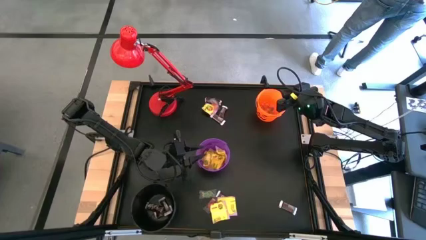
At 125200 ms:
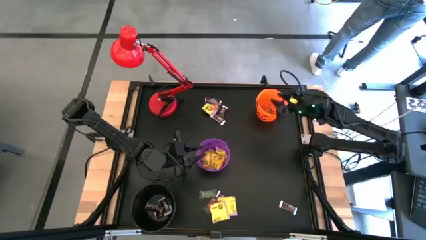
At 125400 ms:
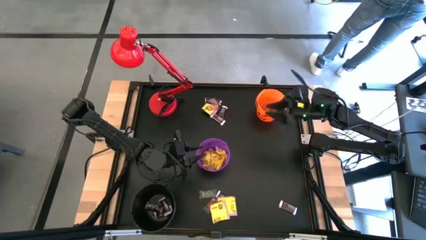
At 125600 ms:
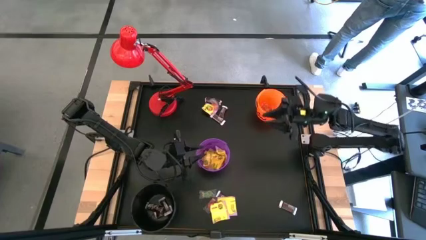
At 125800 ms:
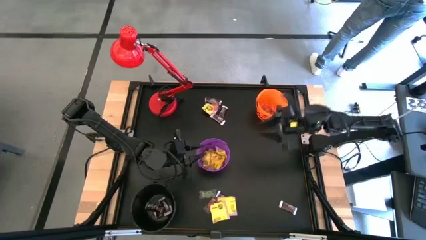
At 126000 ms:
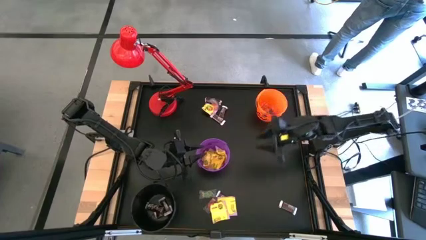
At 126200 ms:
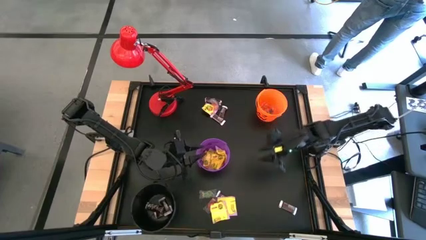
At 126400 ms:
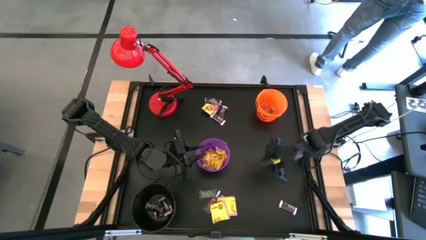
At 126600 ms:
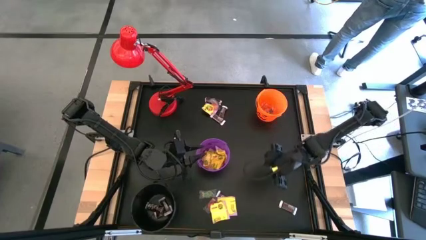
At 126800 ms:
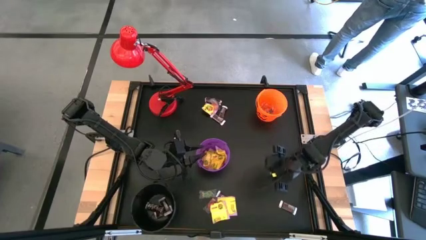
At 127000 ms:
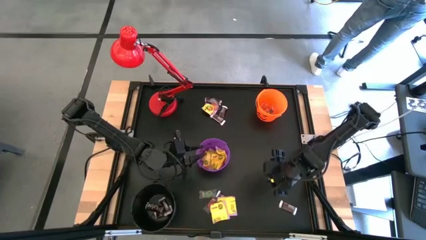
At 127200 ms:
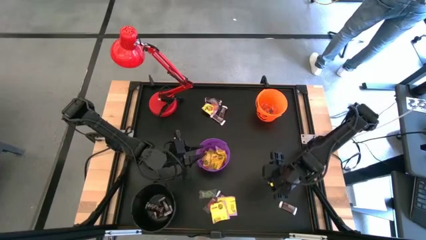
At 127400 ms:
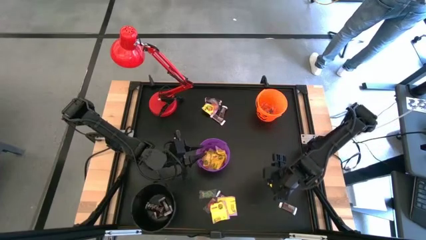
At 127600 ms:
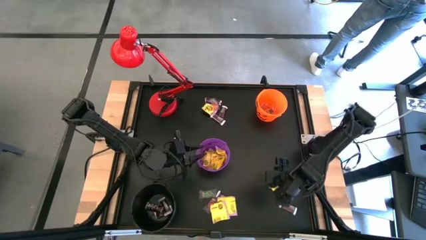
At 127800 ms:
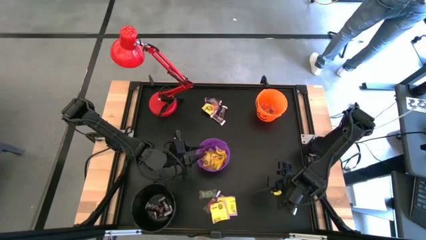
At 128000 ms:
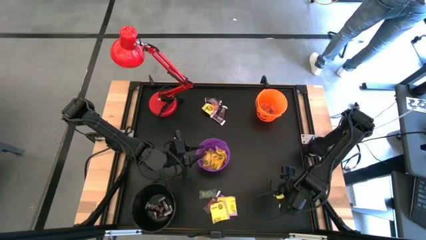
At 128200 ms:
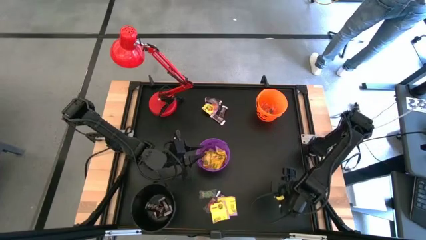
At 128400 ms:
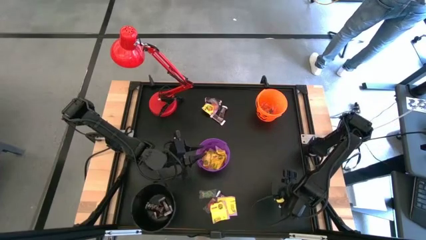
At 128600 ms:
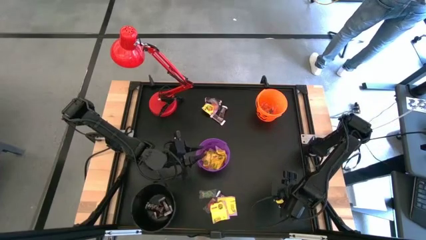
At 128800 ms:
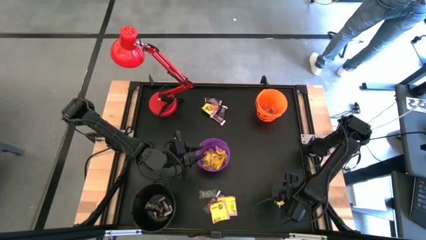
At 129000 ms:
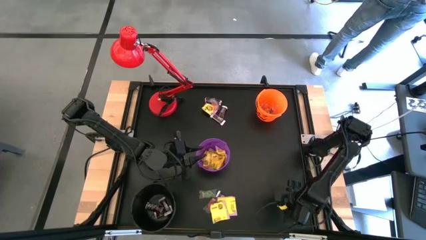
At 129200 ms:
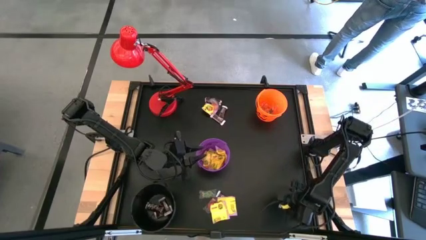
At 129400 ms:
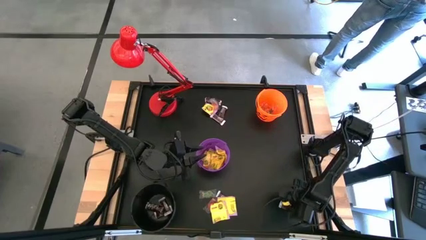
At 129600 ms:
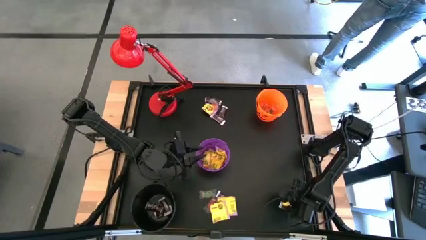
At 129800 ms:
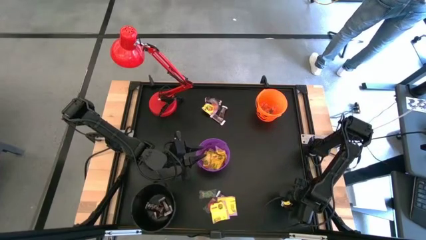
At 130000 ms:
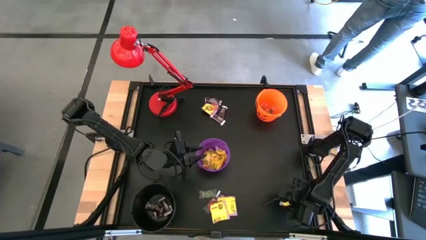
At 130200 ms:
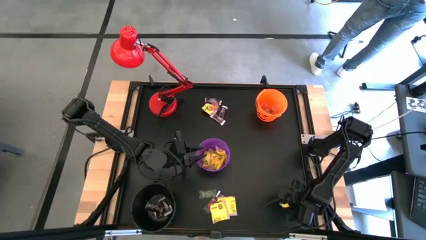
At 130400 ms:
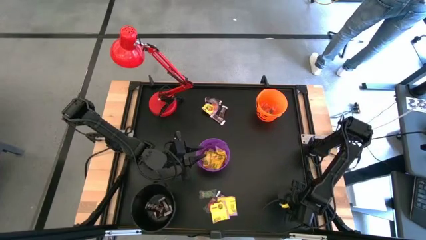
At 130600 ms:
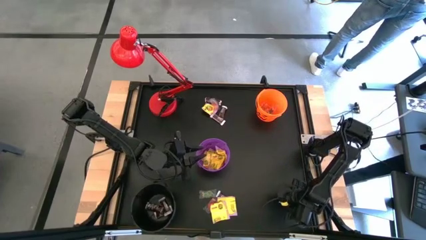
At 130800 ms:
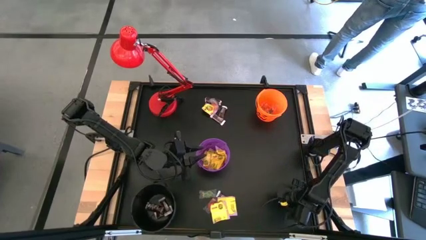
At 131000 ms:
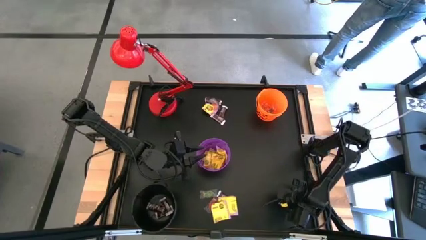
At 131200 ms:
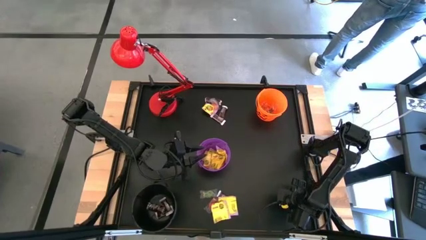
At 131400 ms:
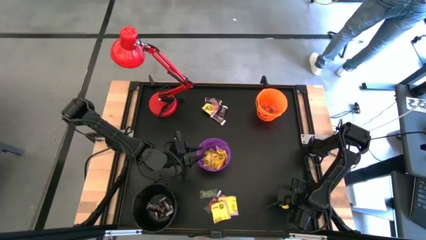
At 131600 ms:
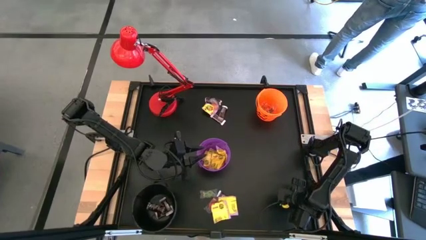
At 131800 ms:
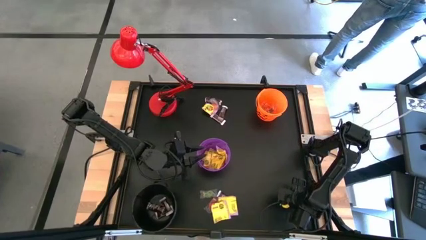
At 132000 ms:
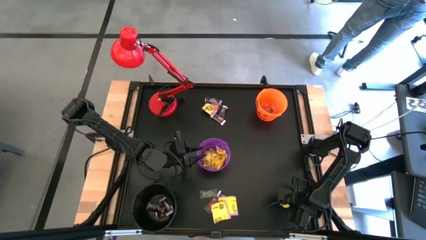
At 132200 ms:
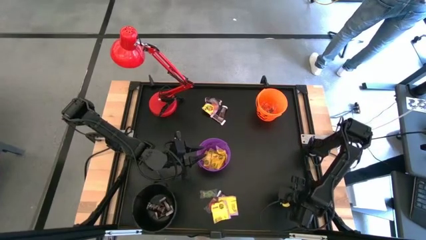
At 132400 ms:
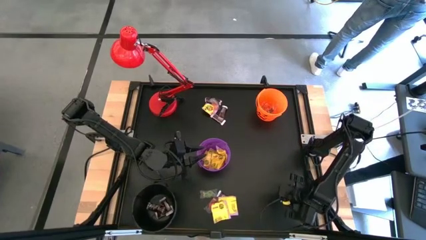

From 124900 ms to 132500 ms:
Task: Sort candy
Put the brown chocolate bar into the black bucket

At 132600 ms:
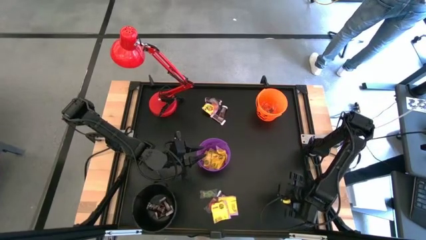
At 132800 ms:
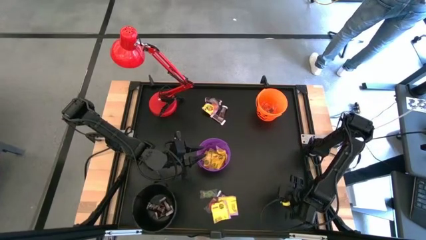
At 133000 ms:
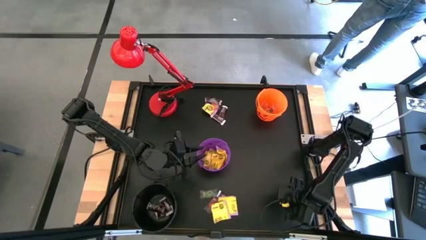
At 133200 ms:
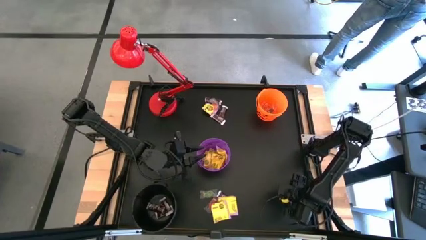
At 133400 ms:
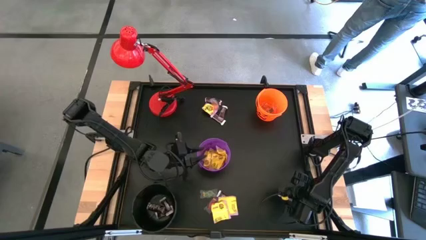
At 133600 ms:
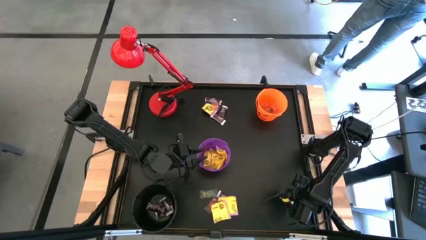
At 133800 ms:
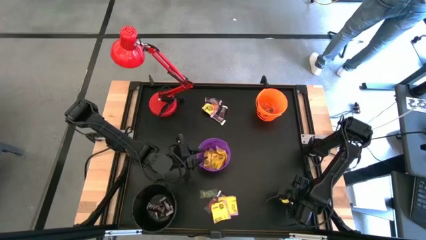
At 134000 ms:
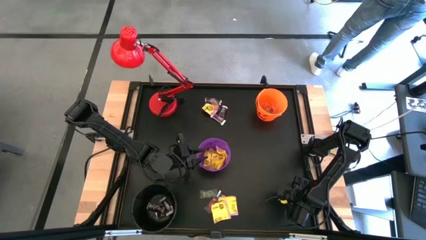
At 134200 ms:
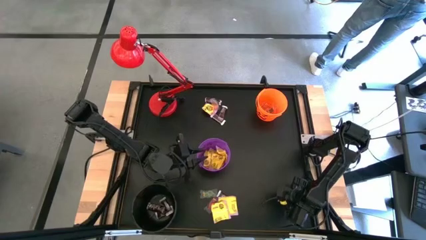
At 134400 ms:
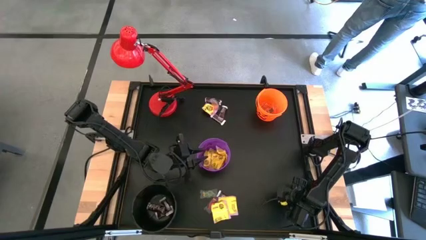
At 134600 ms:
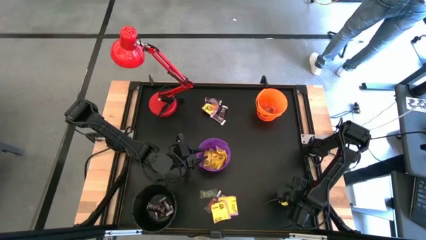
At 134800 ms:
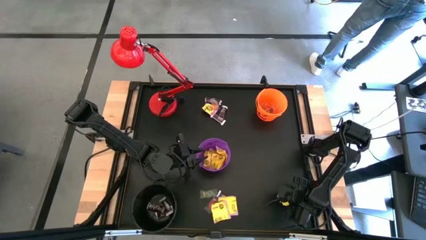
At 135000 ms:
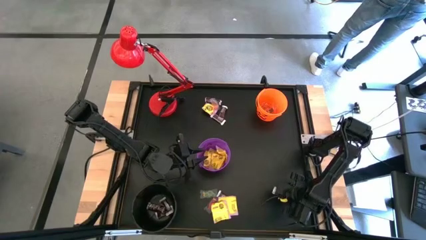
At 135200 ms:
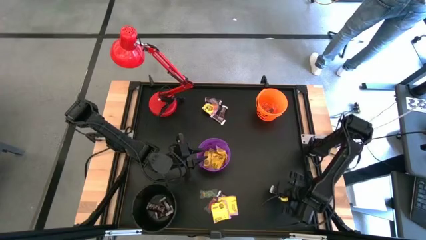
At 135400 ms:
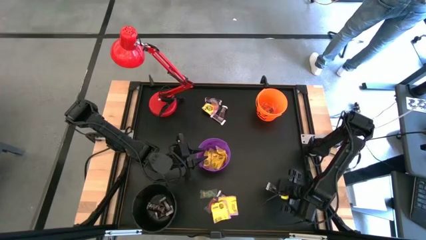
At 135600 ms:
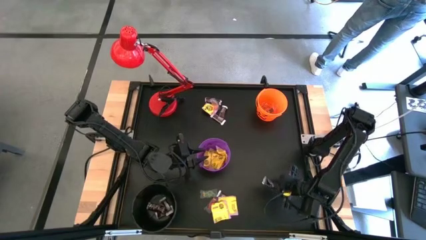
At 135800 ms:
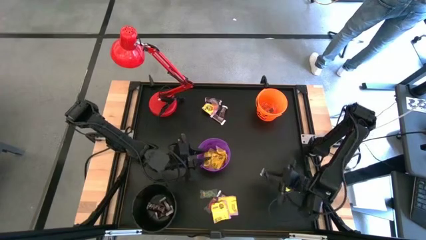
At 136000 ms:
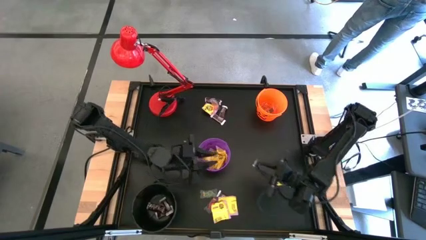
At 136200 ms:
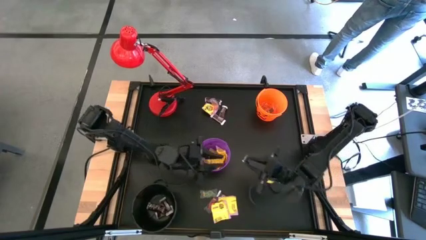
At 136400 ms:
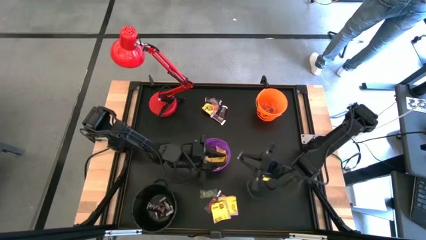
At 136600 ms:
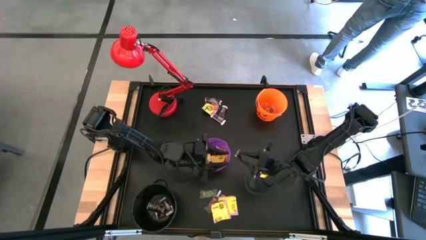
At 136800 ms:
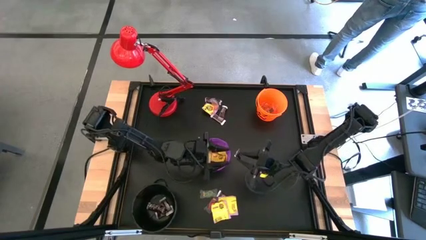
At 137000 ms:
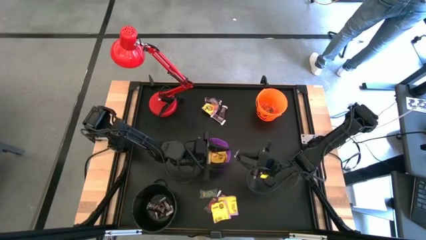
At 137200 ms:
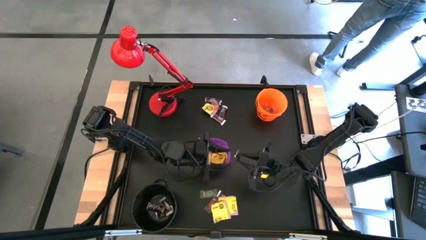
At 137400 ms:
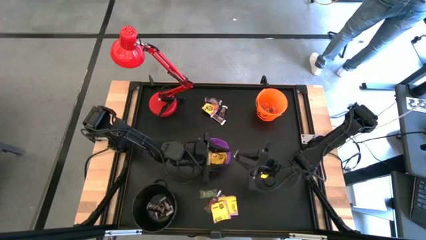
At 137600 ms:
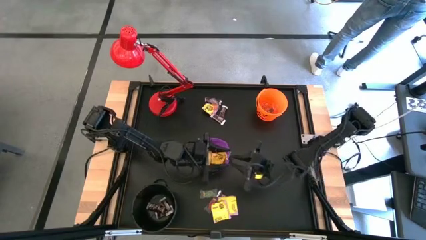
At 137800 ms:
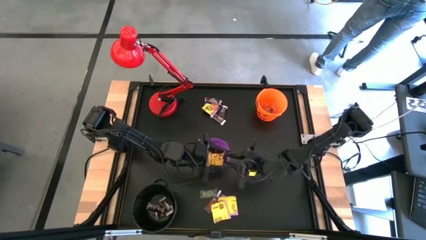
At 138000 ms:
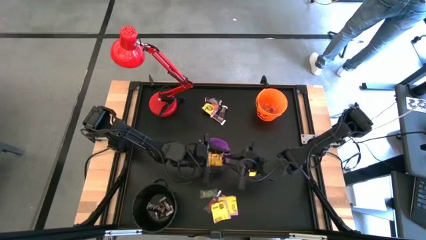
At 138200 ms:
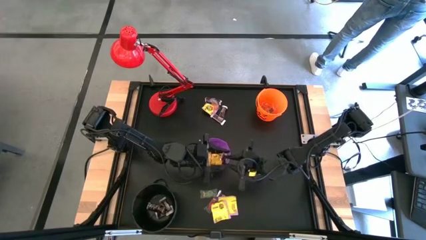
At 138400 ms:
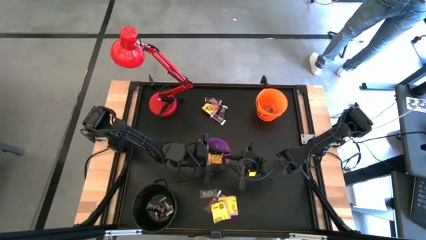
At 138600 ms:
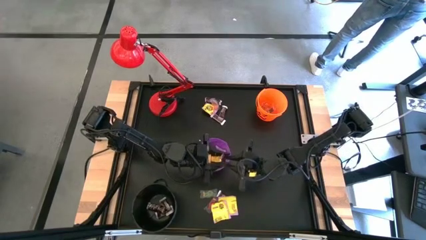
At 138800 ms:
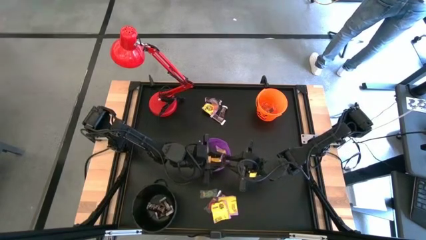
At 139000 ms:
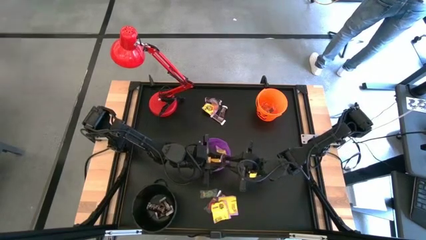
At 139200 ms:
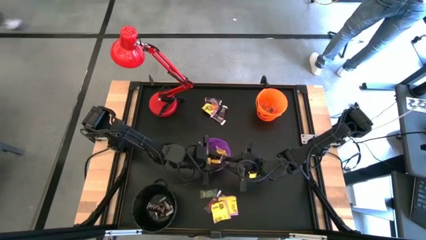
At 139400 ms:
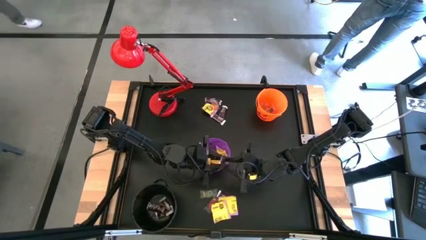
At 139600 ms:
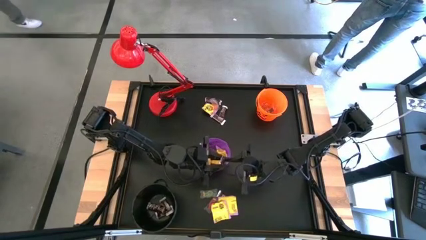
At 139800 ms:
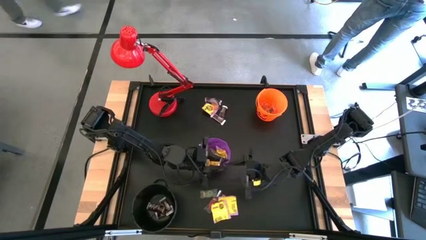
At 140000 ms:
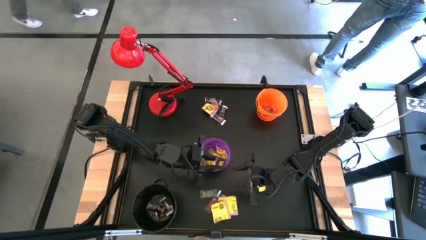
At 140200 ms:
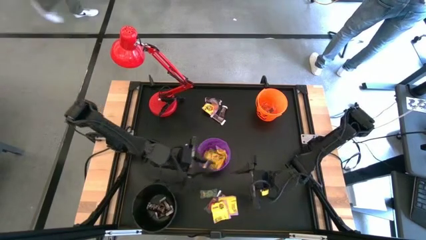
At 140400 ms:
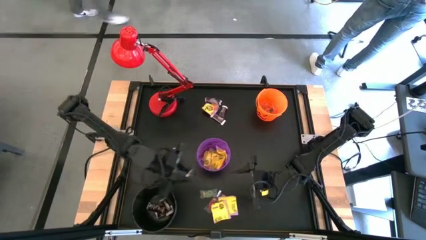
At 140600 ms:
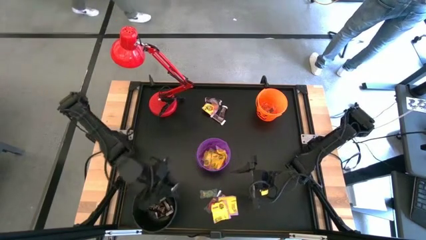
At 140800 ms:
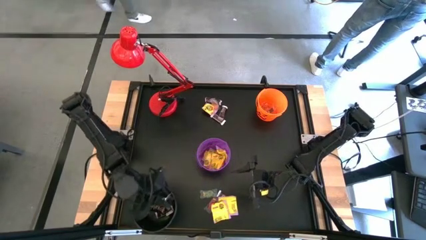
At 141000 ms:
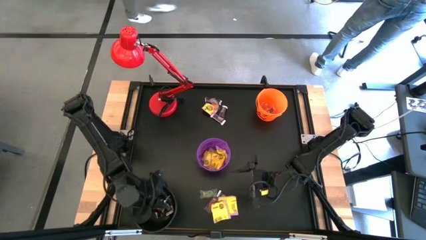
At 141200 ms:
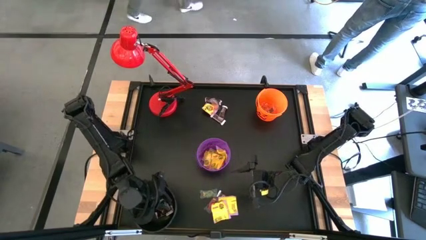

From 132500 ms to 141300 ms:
Put the brown chocolate bar into the black bucket

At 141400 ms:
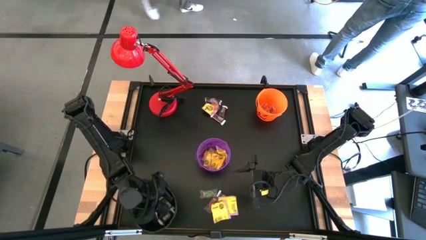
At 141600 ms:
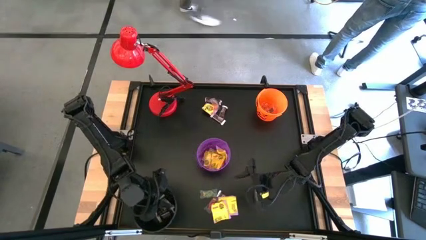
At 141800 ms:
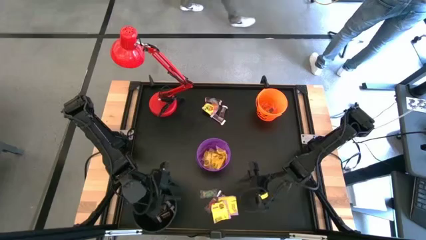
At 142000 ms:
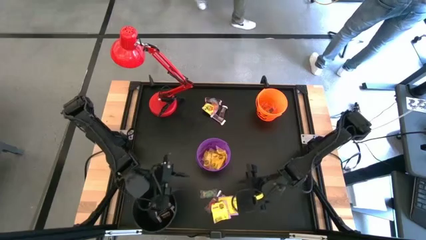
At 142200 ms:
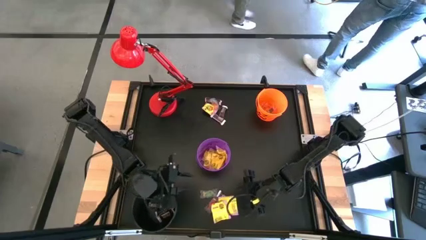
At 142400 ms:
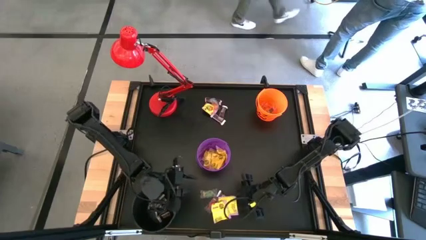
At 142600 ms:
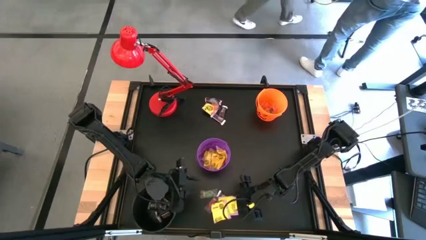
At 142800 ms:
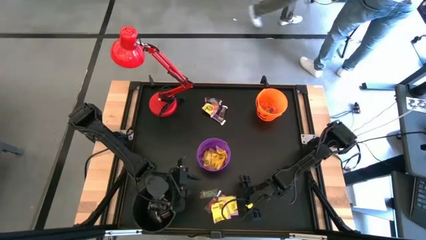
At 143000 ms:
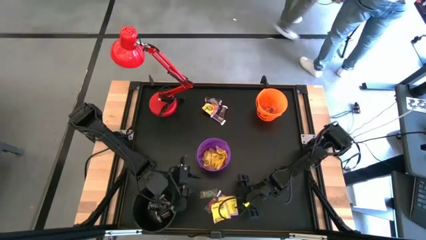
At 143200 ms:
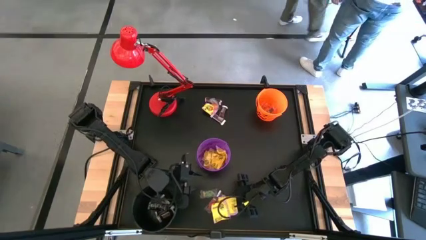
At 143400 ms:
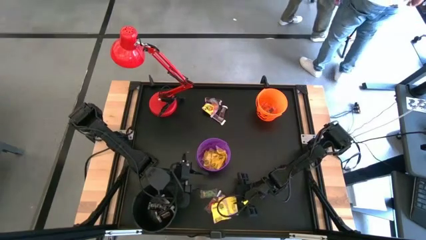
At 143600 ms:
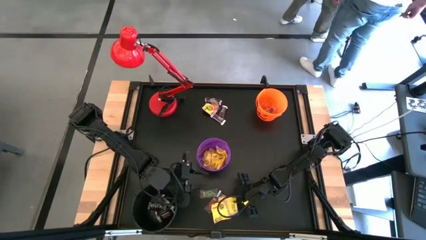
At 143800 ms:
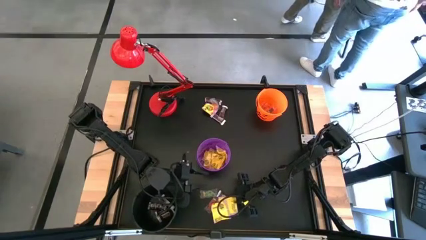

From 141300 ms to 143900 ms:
Put the yellow candy into the purple bucket
